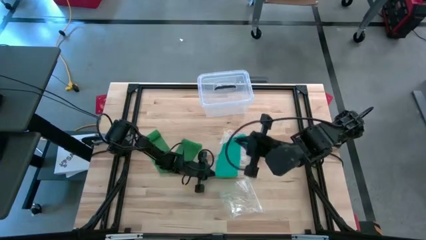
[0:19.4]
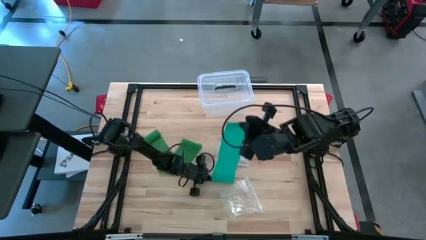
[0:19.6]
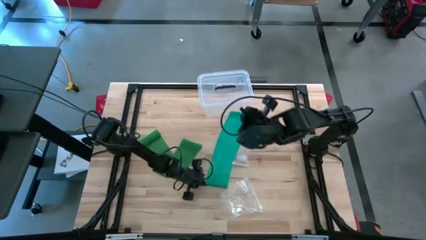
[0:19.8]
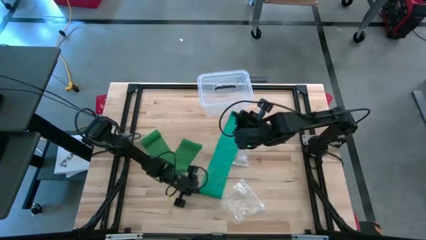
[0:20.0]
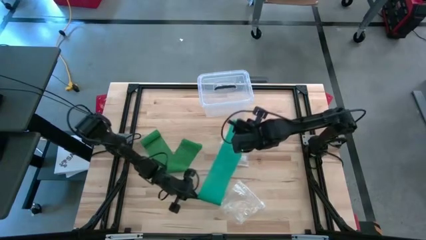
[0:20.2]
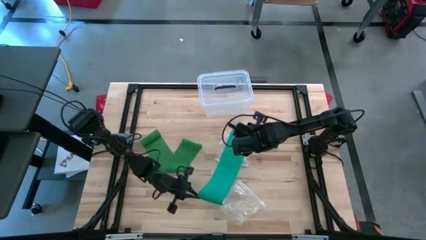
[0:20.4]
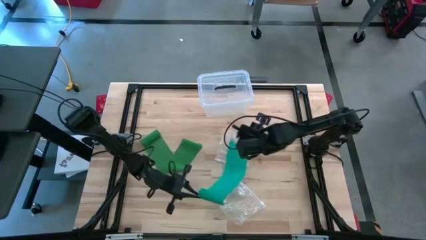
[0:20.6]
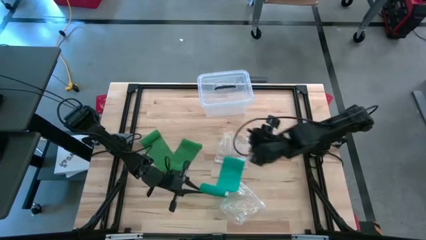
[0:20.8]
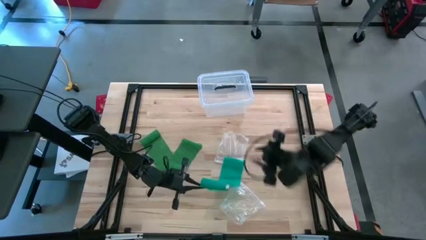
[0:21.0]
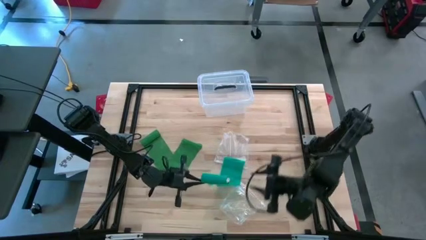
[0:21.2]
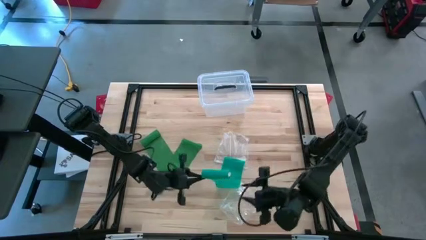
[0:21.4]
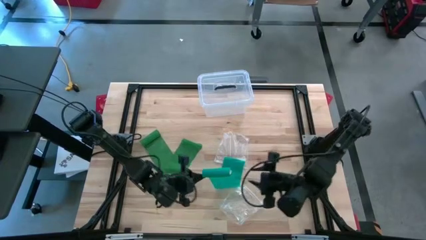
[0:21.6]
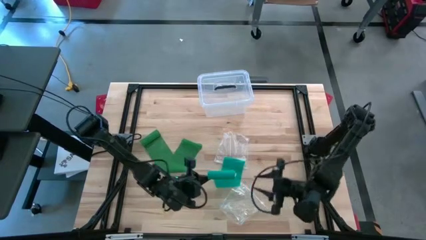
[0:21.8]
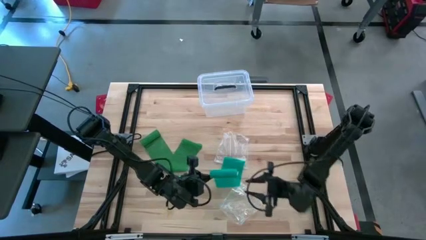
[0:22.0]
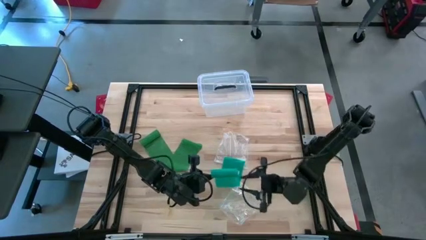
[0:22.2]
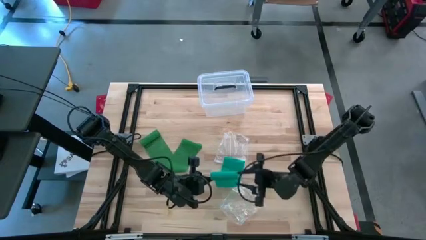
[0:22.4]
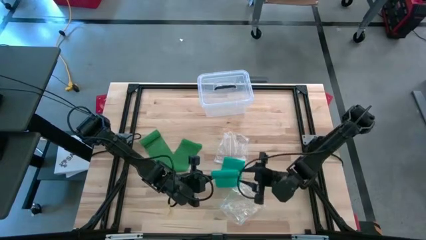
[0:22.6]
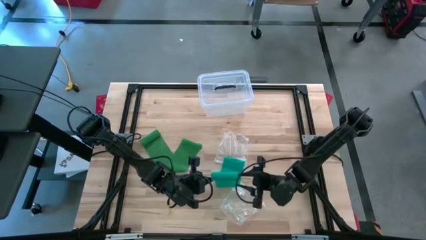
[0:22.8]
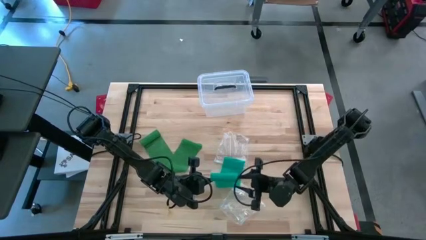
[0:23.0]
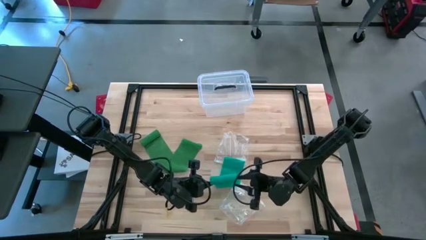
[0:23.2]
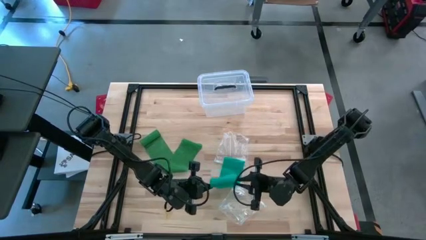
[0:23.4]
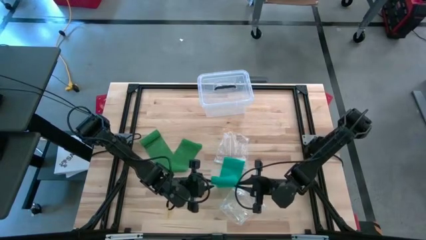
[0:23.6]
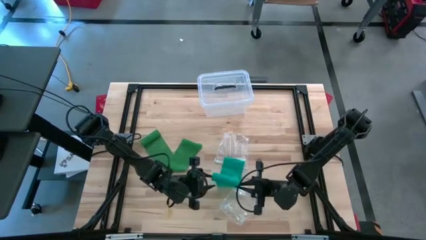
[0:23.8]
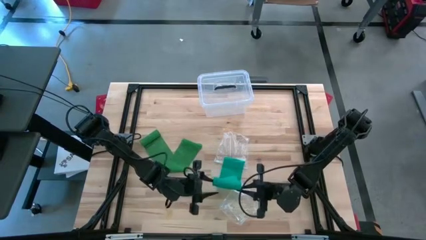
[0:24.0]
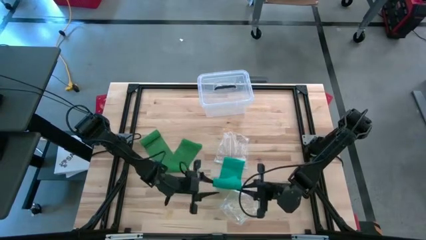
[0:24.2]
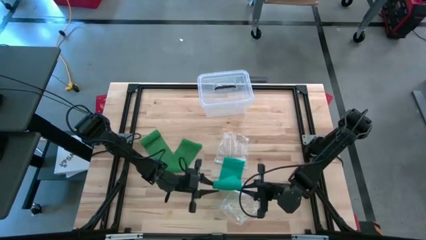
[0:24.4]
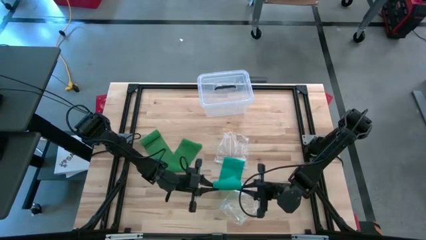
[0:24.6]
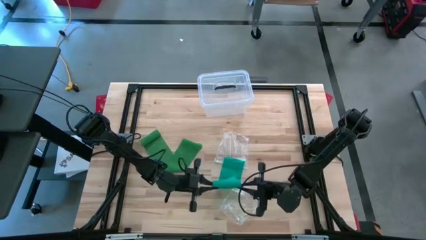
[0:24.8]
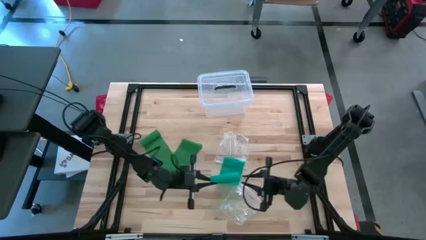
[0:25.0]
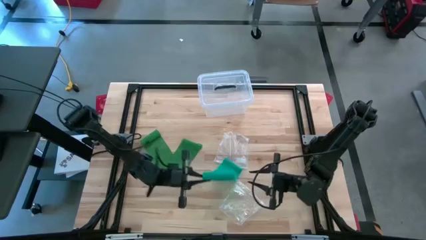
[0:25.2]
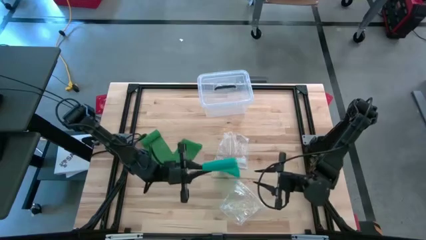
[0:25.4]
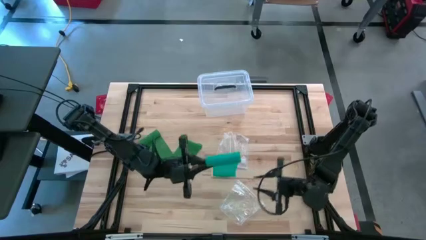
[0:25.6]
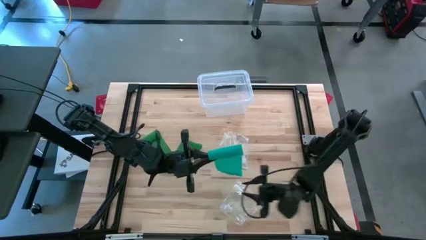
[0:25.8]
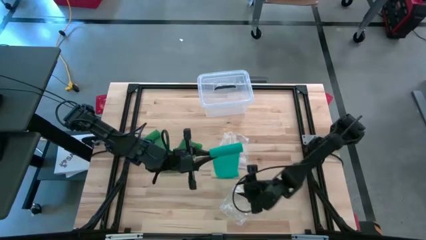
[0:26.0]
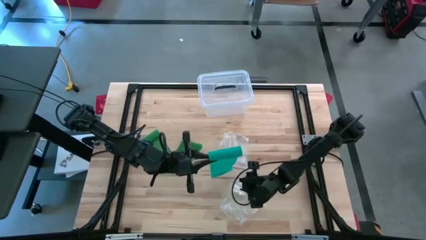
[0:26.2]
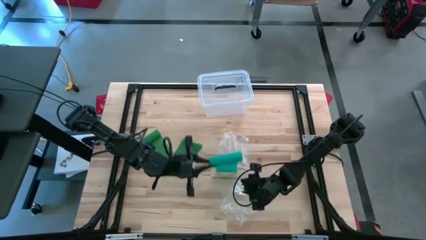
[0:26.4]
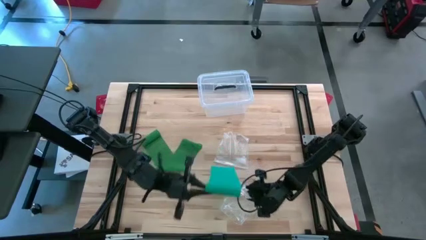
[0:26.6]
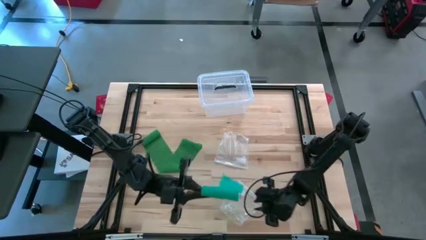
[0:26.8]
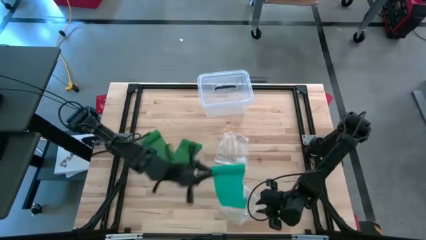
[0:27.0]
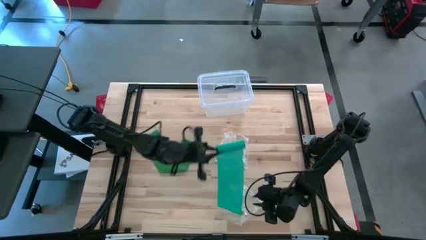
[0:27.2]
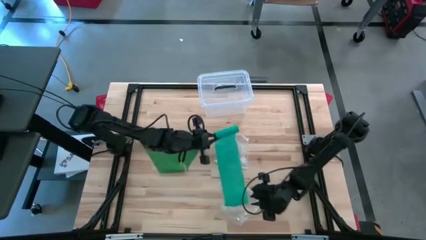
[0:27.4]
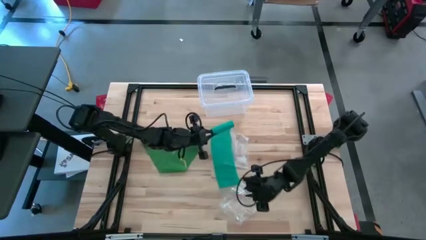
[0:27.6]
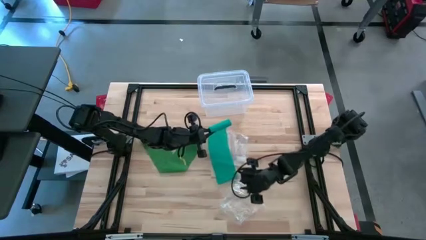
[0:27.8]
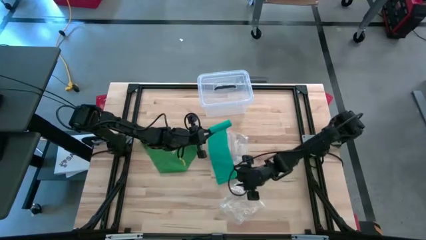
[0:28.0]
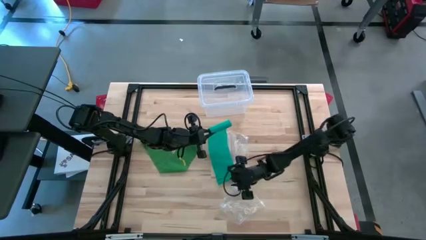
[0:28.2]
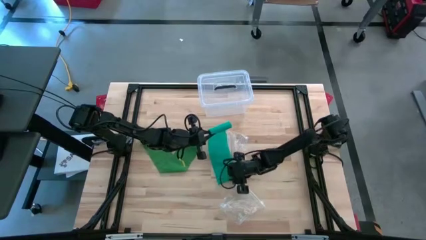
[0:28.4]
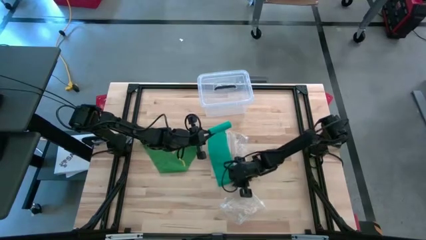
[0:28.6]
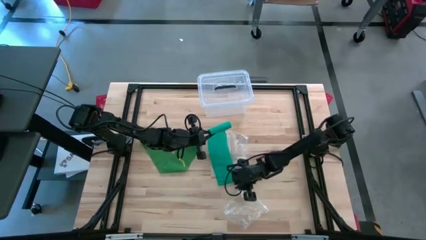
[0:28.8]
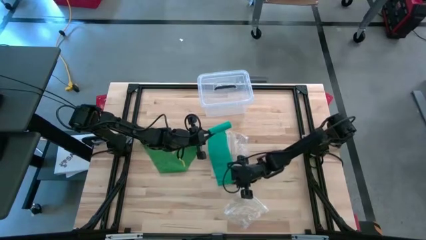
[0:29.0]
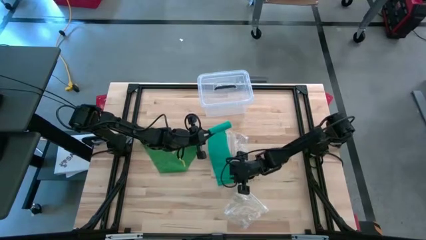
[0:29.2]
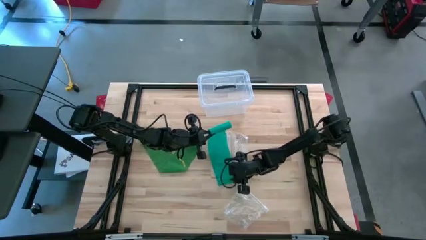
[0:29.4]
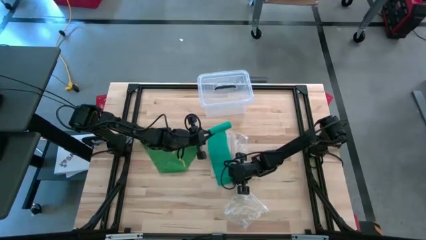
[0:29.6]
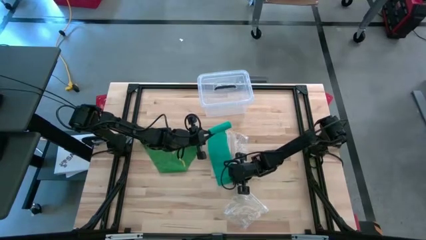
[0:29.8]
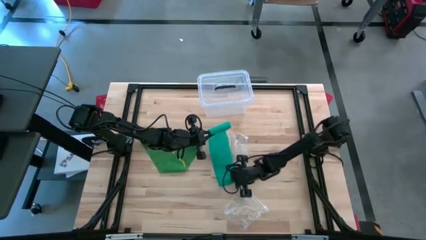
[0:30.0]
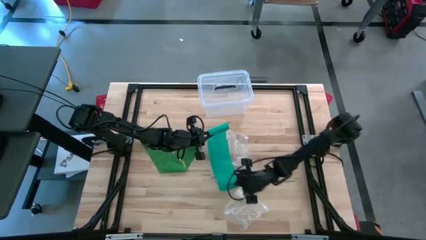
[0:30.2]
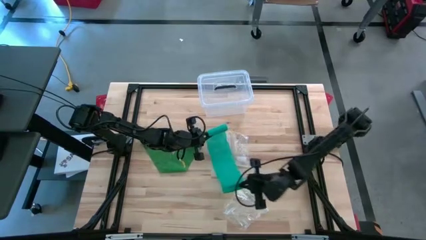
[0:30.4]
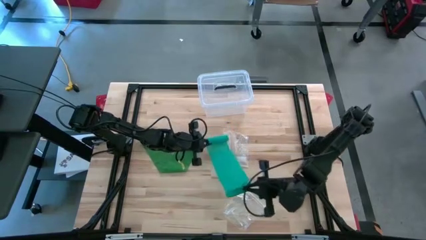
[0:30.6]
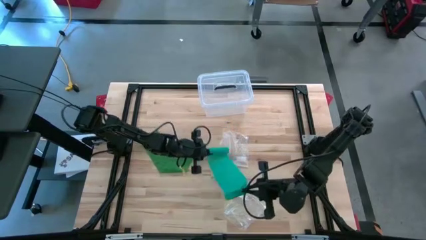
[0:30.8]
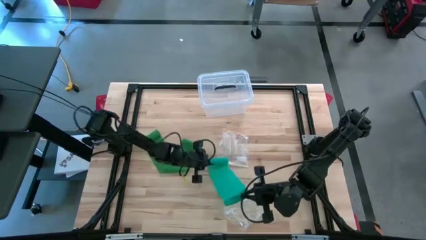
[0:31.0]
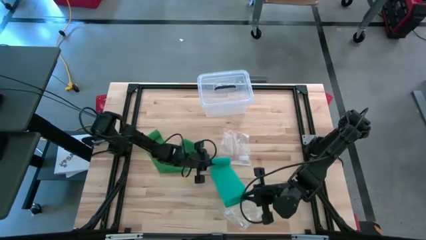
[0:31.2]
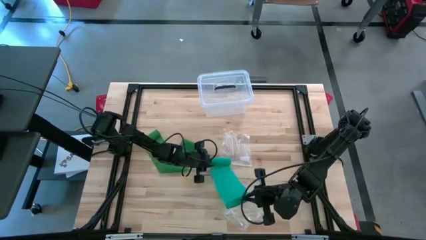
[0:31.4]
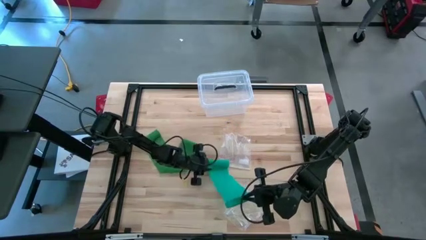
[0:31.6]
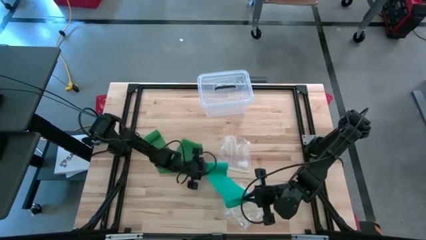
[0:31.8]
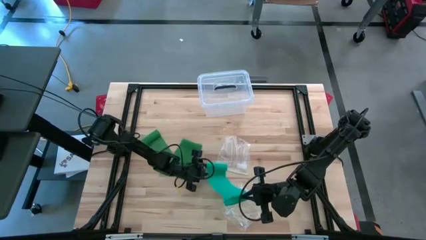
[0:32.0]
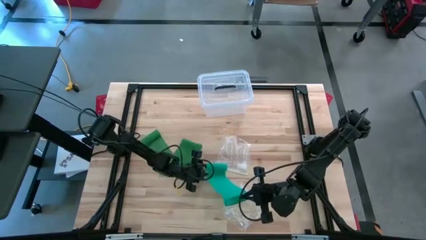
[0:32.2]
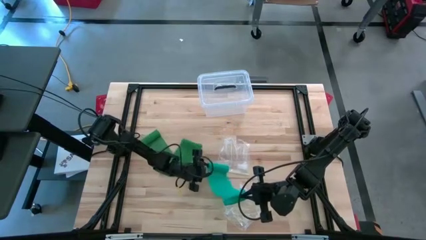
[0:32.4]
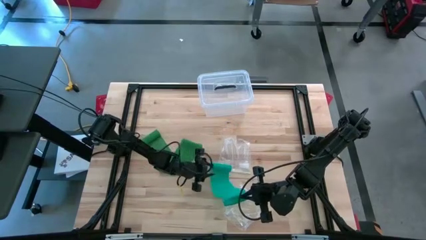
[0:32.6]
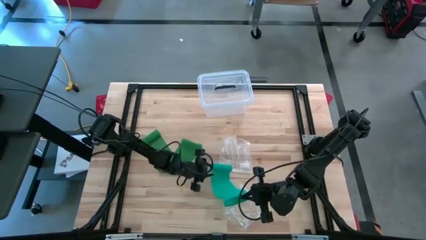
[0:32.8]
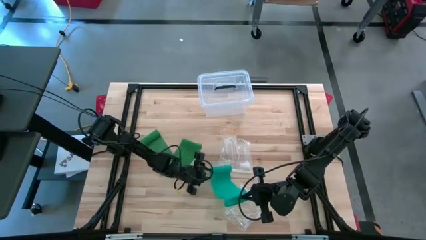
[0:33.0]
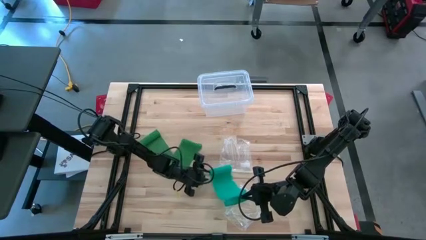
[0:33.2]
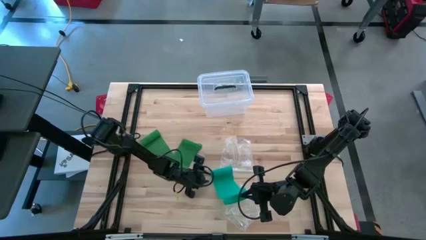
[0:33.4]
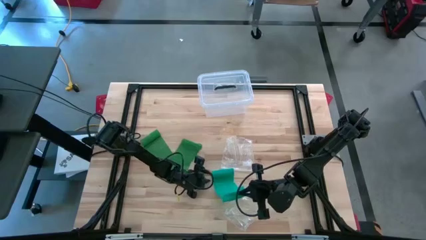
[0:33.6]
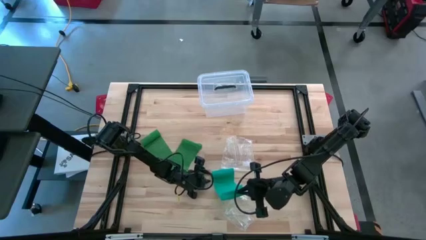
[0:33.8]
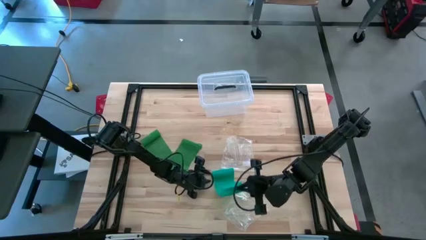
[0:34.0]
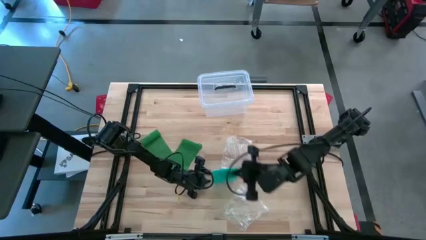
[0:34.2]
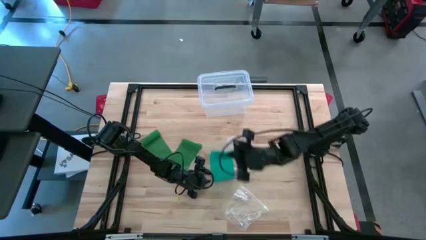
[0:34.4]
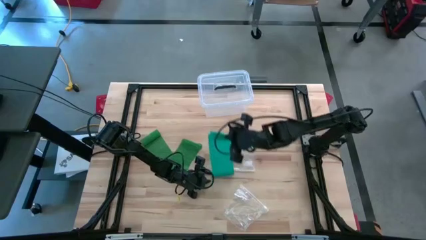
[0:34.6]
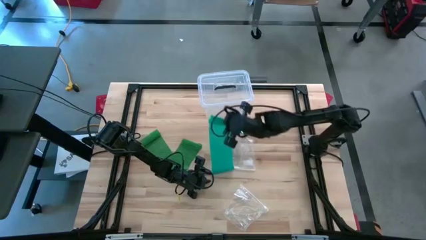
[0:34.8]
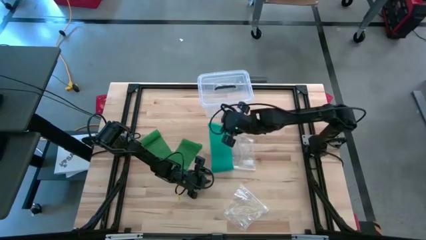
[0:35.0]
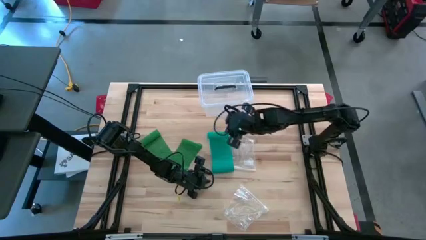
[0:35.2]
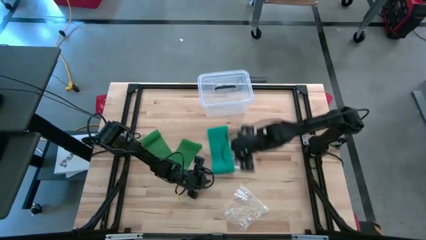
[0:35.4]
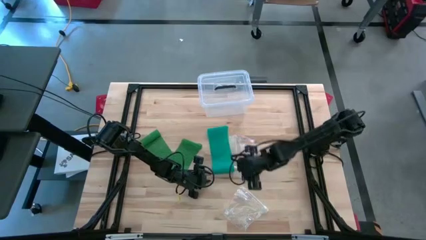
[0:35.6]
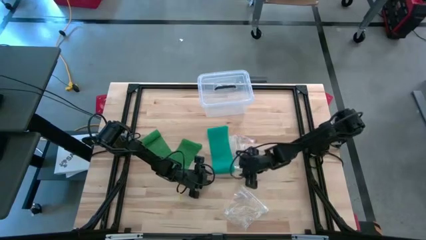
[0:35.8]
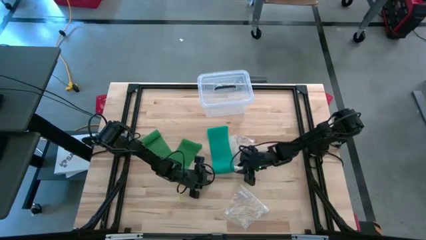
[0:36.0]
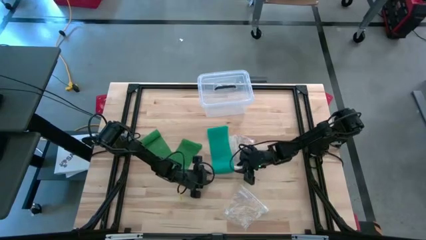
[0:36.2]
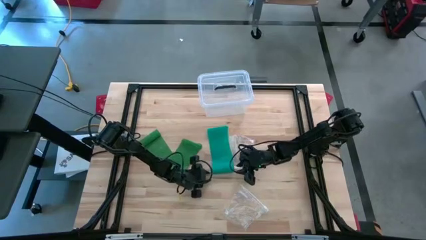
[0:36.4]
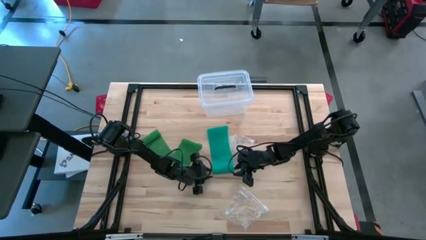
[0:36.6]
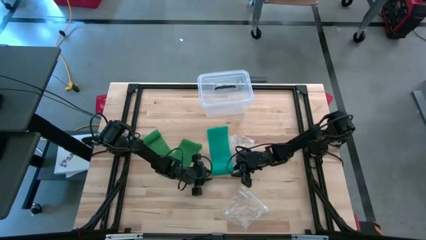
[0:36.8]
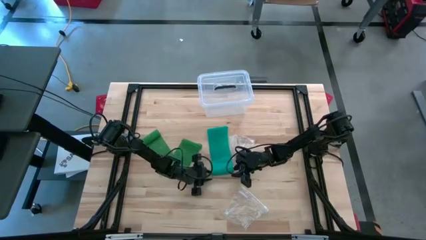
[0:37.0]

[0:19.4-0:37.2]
Task: Roll bandage
Roll the blue bandage
